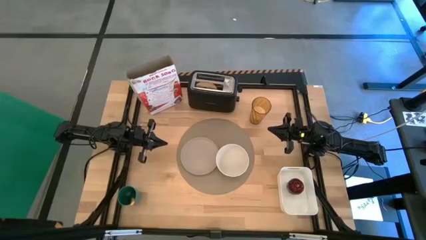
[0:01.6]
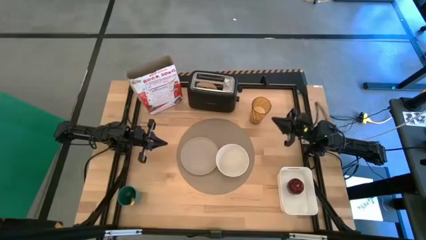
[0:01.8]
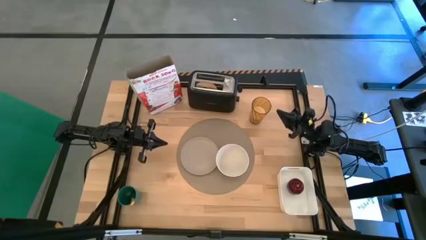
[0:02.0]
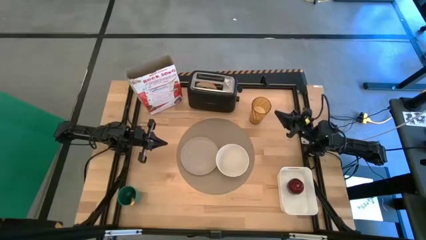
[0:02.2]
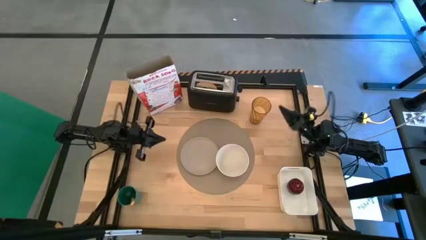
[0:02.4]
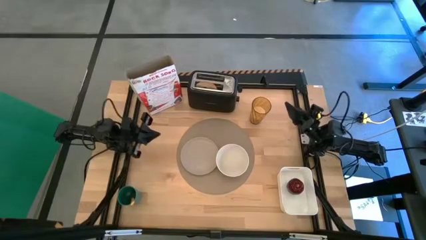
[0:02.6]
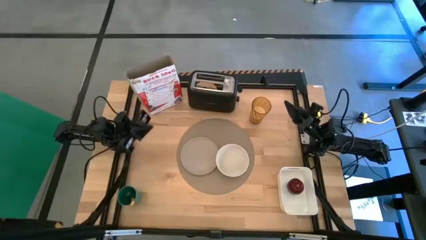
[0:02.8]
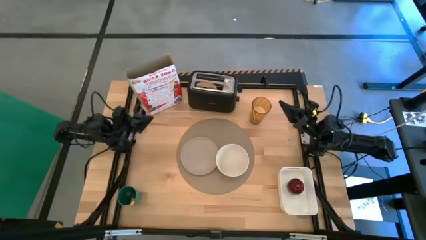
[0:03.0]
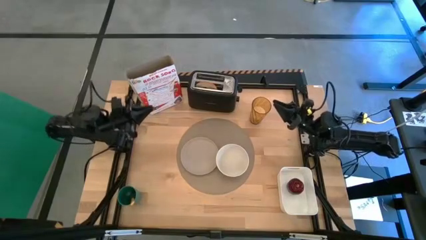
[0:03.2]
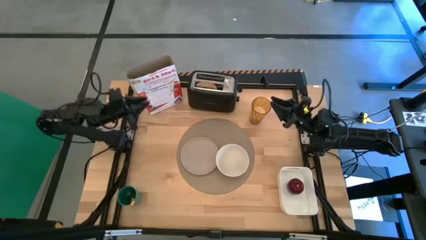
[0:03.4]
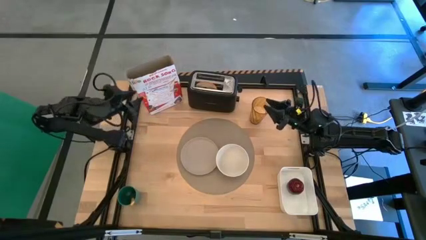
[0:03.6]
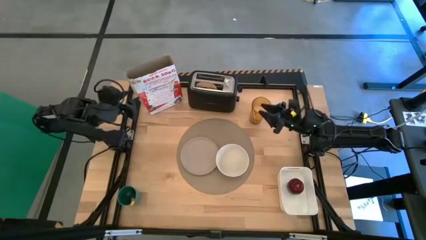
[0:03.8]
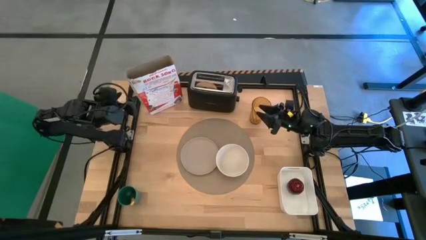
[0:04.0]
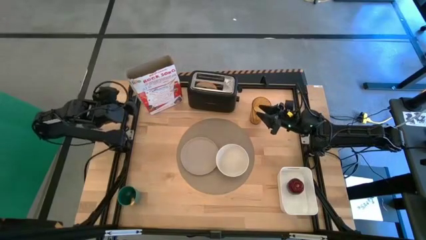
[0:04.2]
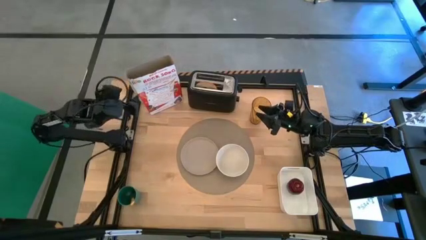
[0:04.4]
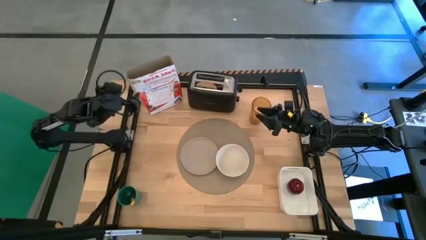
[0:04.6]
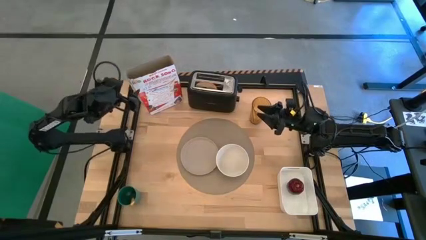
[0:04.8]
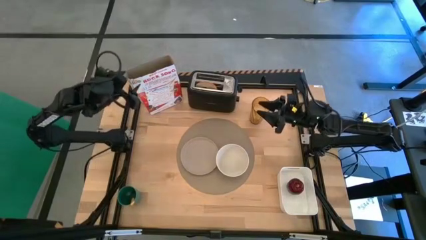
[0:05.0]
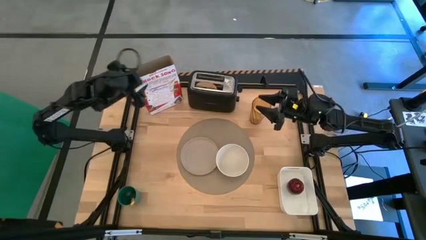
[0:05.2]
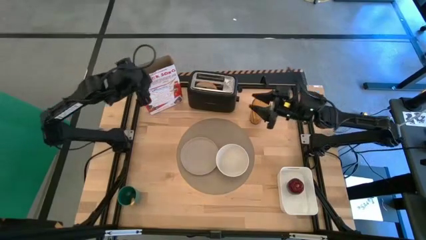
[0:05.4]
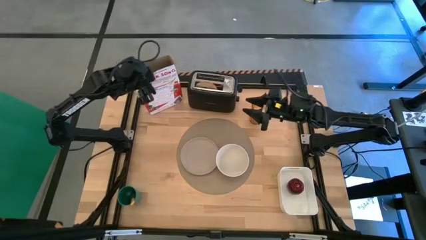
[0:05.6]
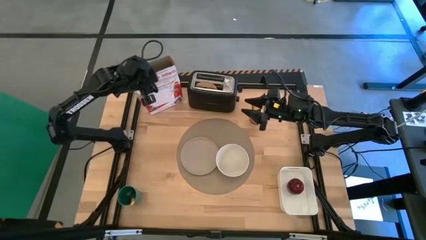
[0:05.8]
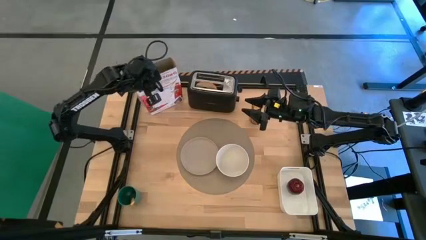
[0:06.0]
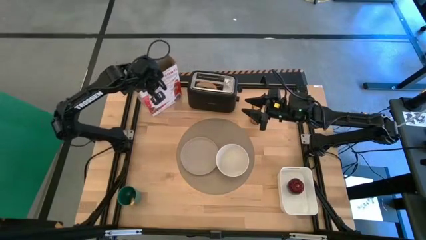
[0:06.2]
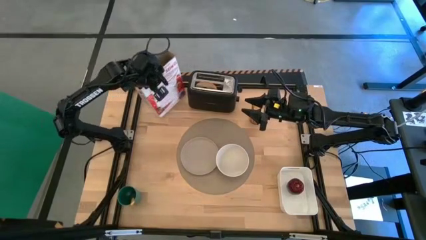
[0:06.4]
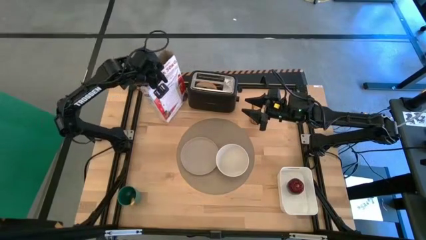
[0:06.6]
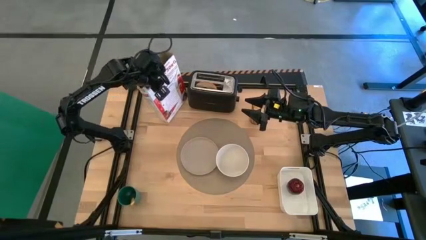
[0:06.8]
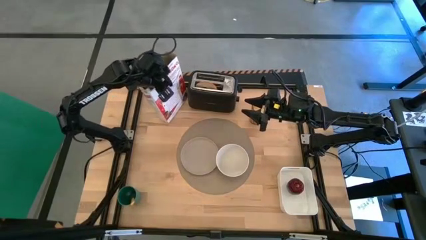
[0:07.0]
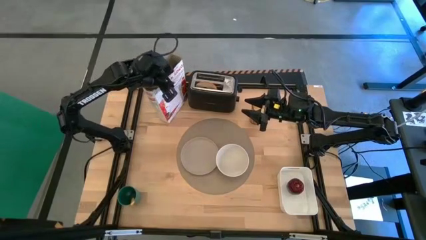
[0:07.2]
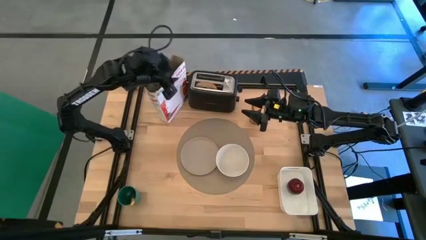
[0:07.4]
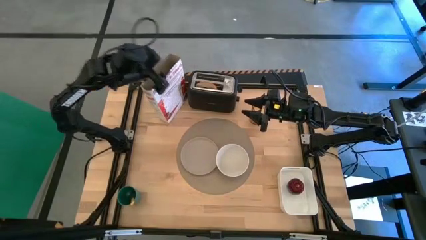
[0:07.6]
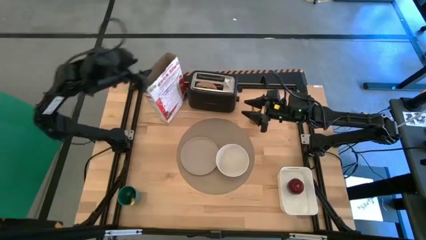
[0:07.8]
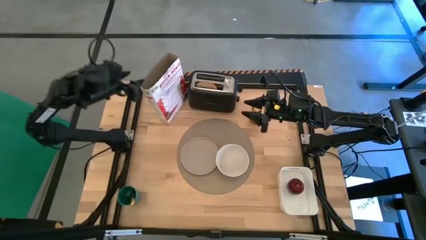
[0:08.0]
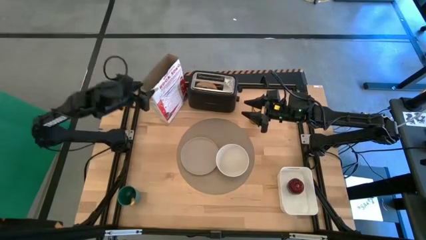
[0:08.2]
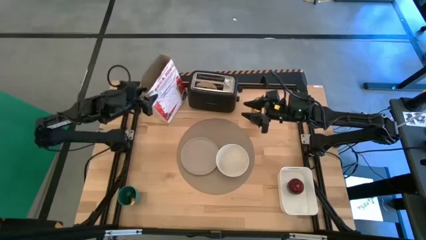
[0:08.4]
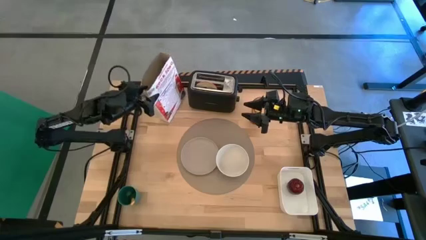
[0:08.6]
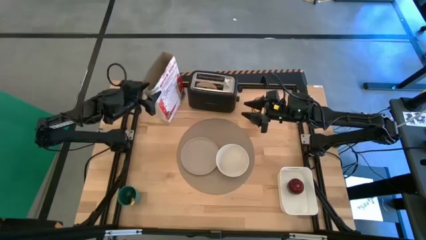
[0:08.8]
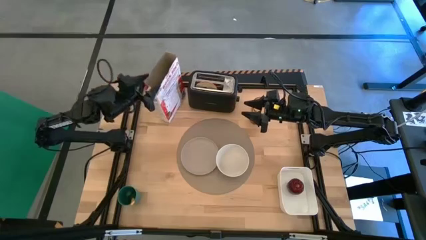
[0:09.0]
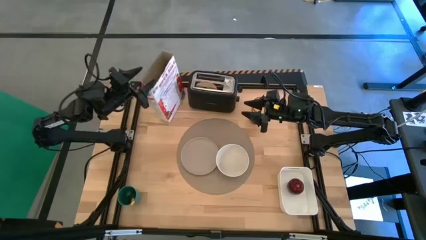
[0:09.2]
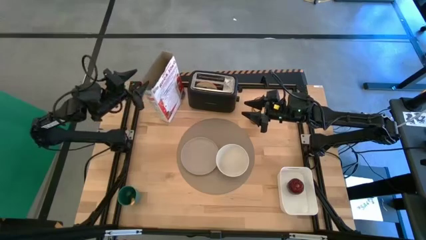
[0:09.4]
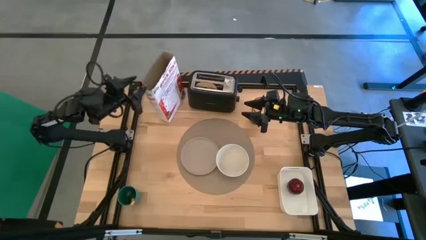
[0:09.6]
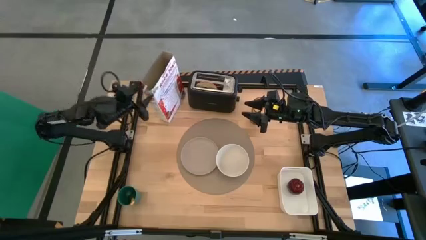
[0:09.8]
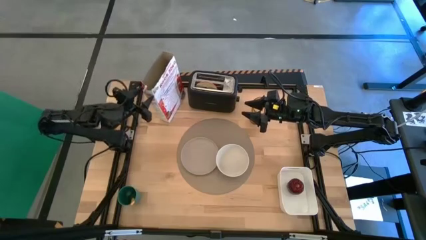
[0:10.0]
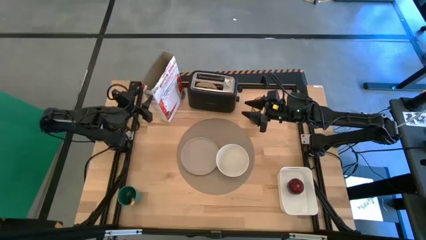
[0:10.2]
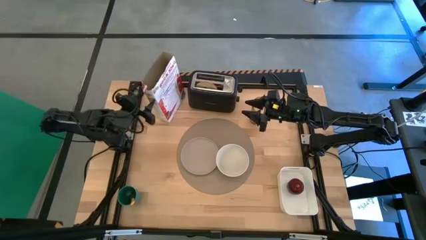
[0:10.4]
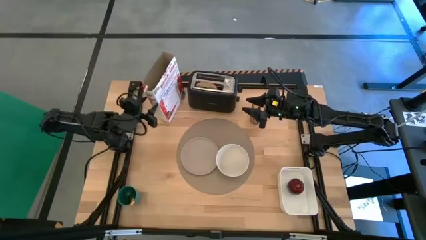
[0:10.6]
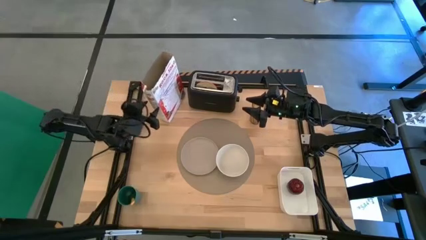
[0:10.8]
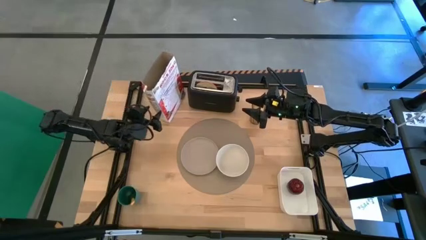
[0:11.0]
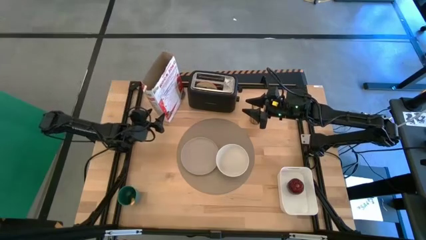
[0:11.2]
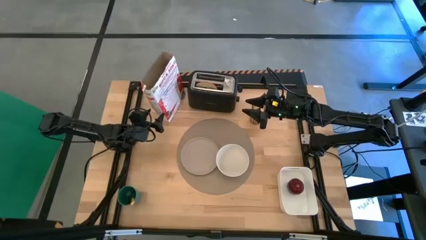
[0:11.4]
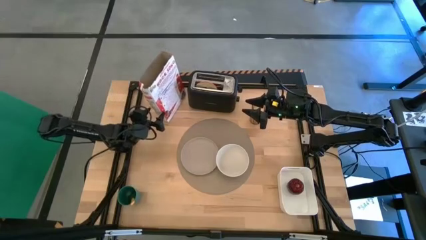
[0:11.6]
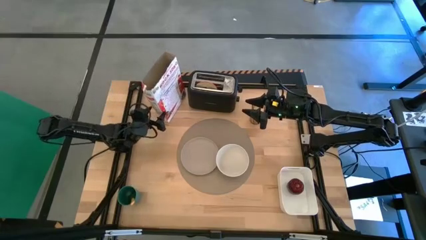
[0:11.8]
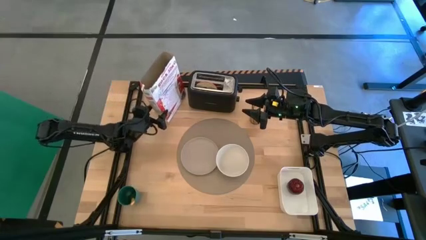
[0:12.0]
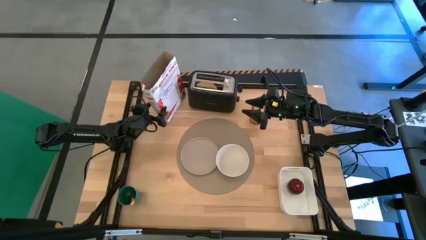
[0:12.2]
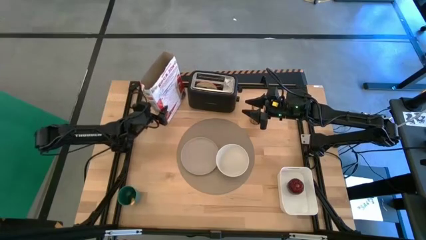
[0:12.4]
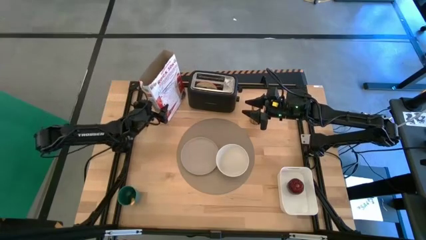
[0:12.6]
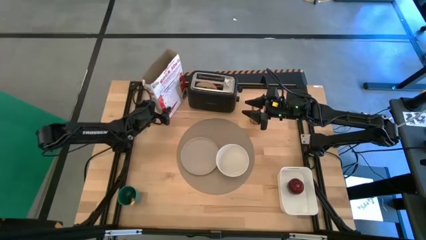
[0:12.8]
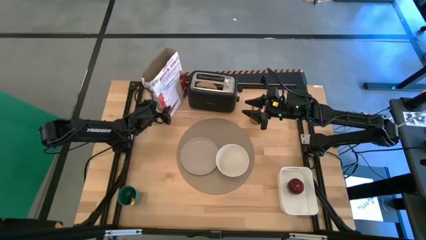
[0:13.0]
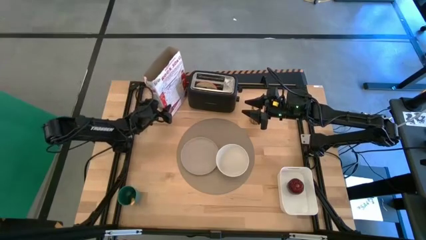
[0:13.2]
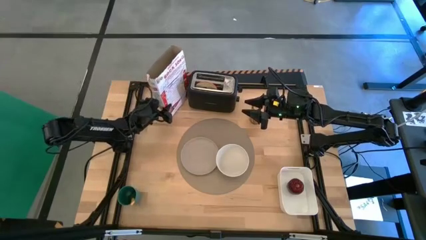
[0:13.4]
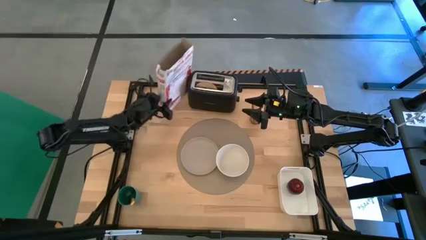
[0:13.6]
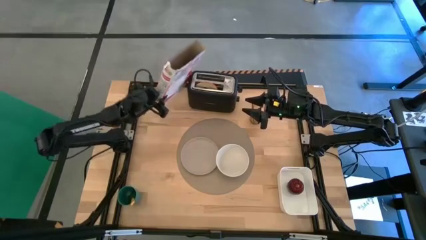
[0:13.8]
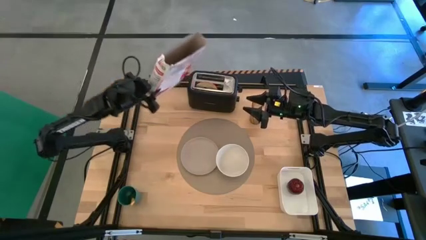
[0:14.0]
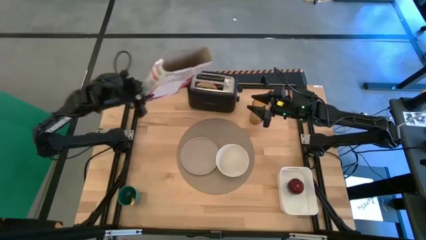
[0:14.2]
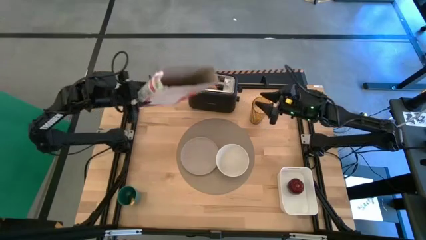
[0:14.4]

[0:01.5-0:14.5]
Task: Arrange a breakfast setting
Pour the cereal into the white bowl
